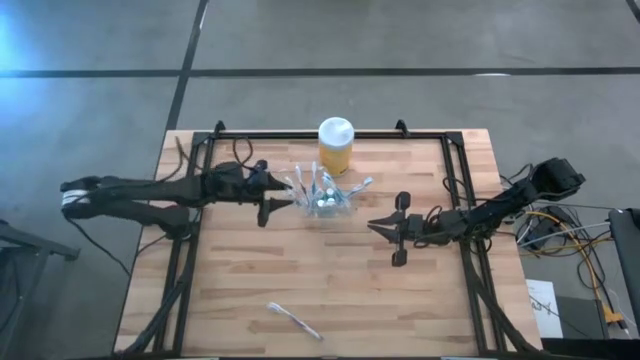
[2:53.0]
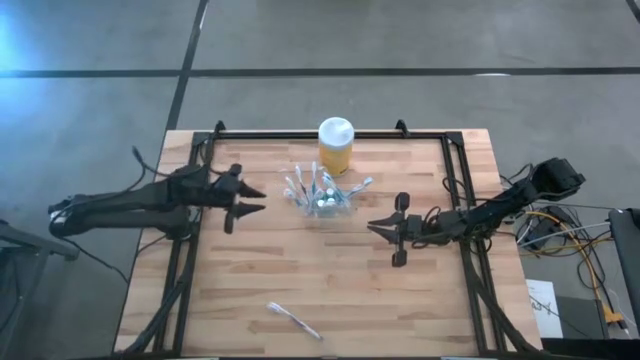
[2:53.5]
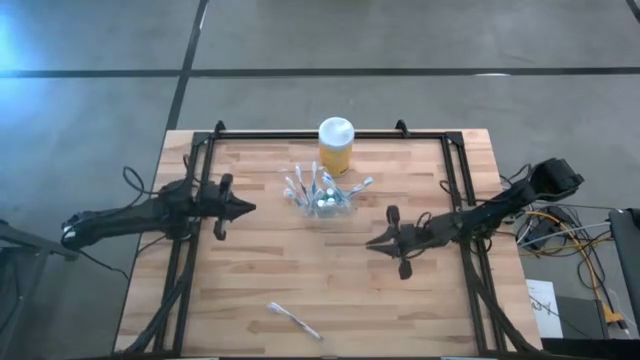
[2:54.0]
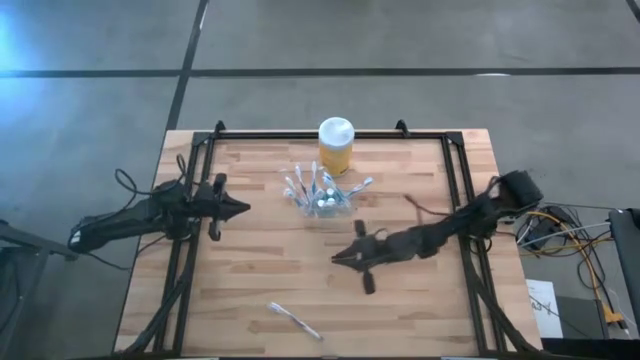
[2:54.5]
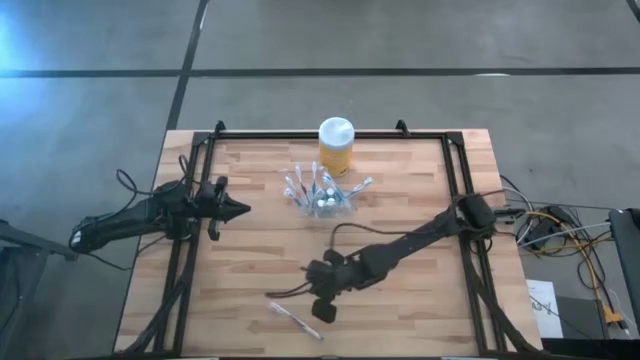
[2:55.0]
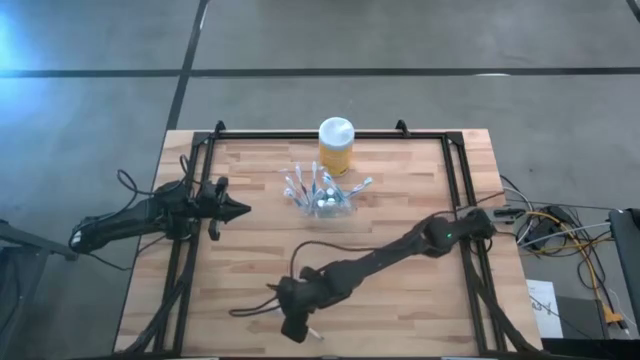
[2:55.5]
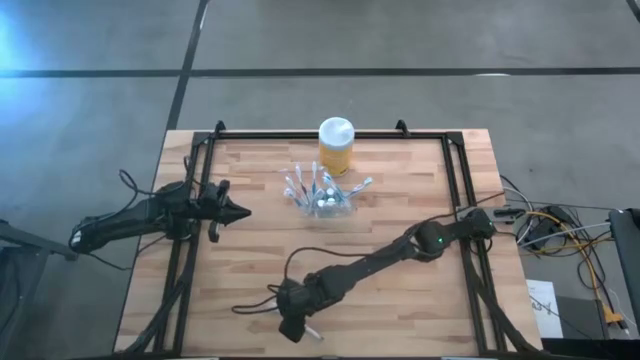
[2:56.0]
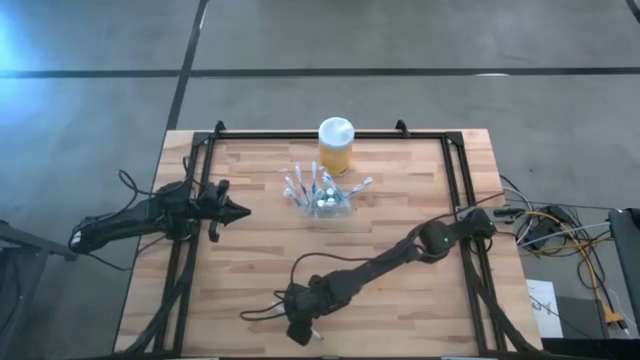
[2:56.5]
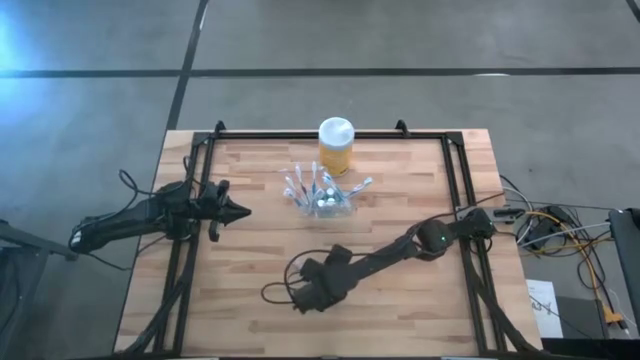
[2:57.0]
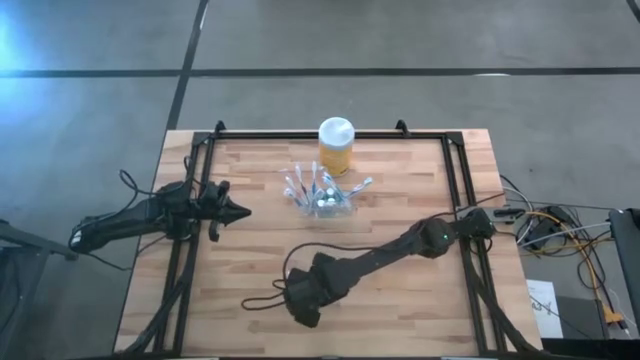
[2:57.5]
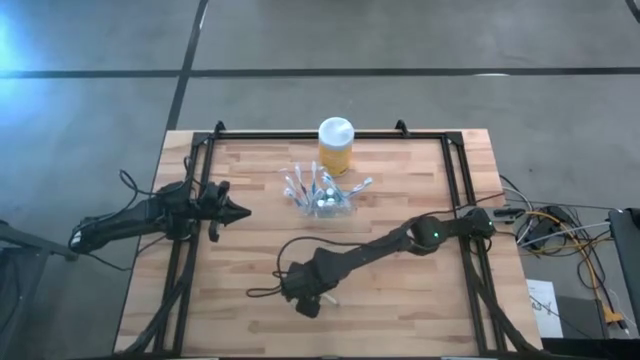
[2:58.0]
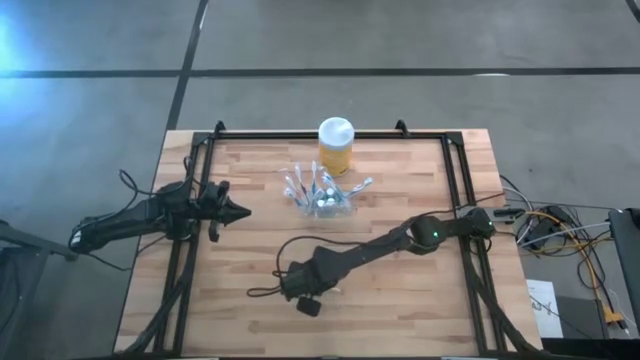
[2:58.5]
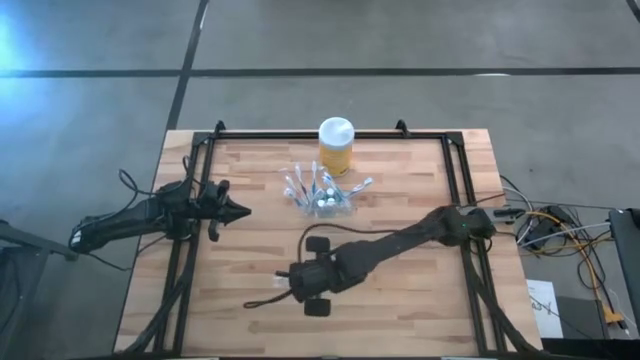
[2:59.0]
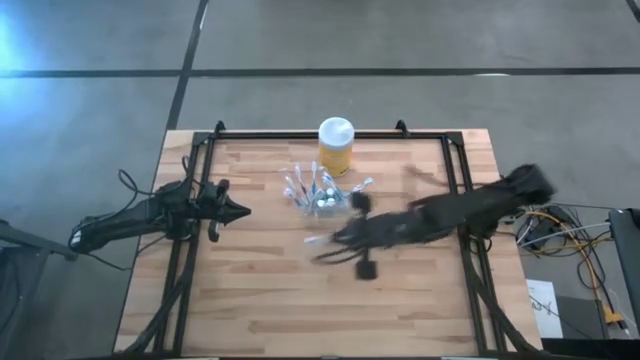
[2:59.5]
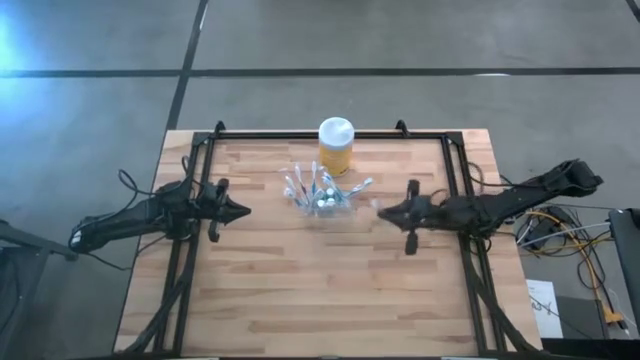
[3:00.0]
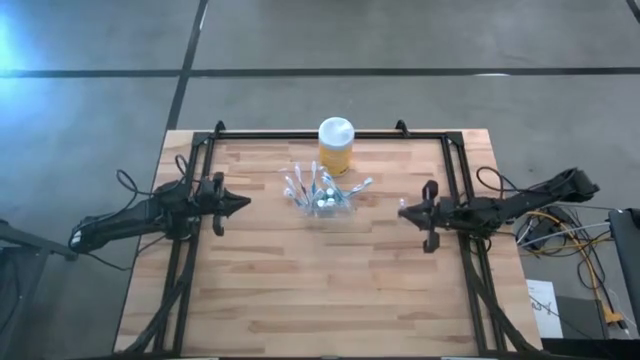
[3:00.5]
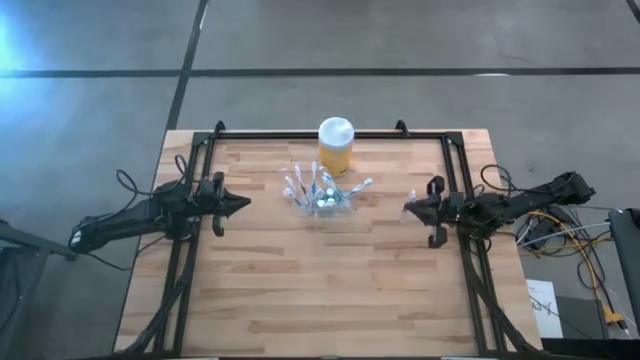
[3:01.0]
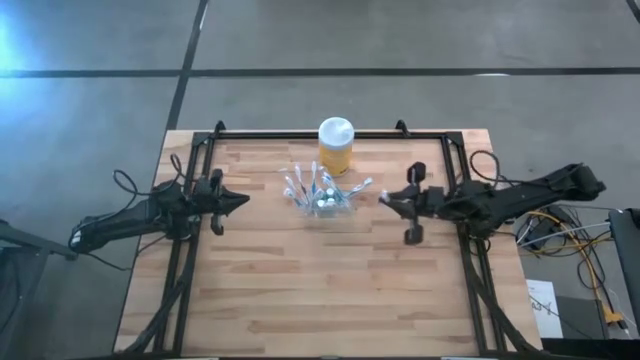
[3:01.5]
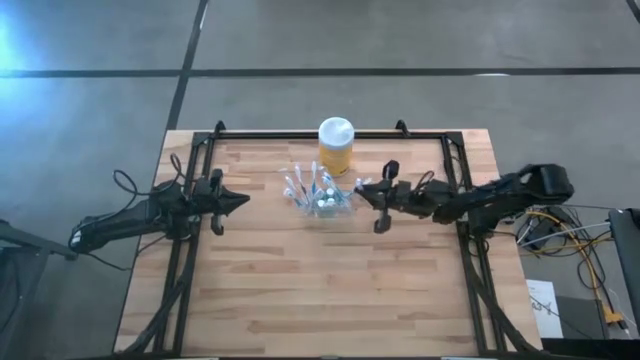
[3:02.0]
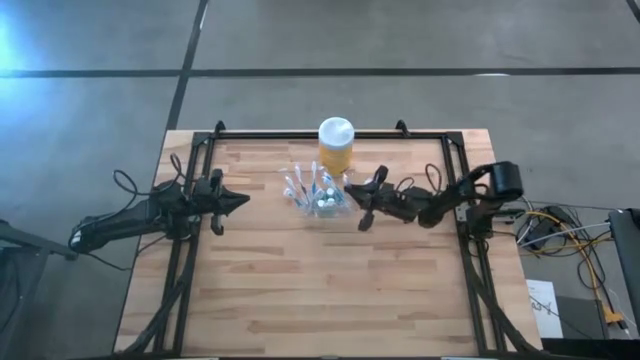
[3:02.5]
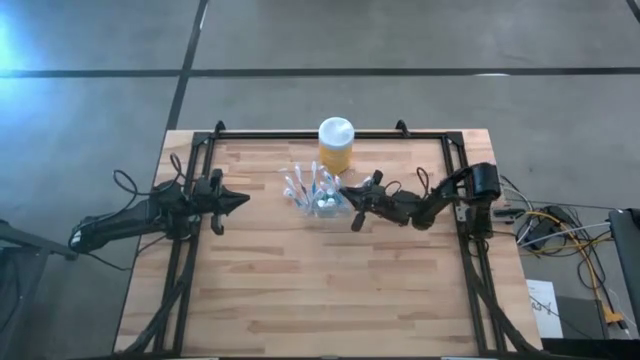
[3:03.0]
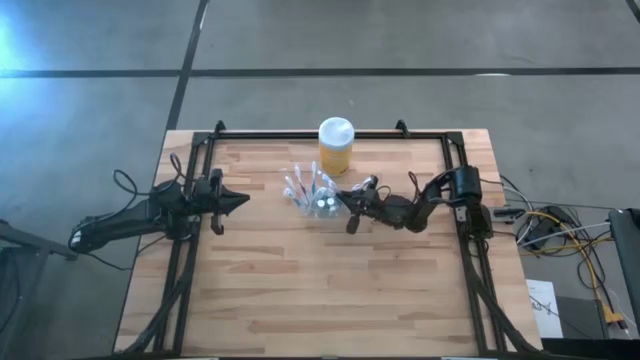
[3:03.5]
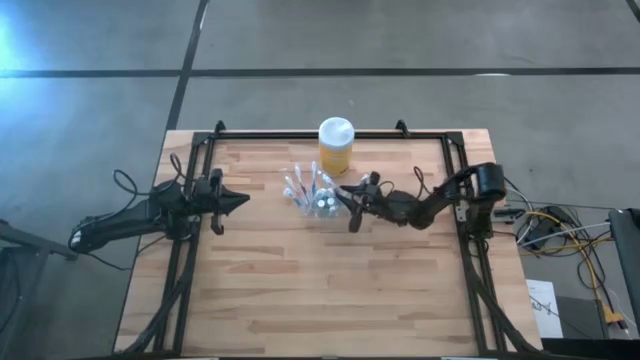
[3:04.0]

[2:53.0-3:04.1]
Task: Pick & Place toothbrushing station
Put the purple toothbrush into the transparent organizer

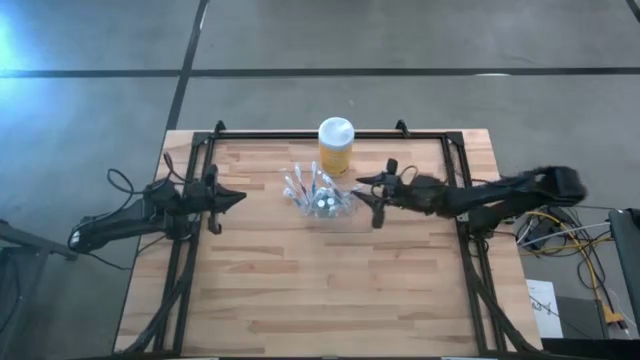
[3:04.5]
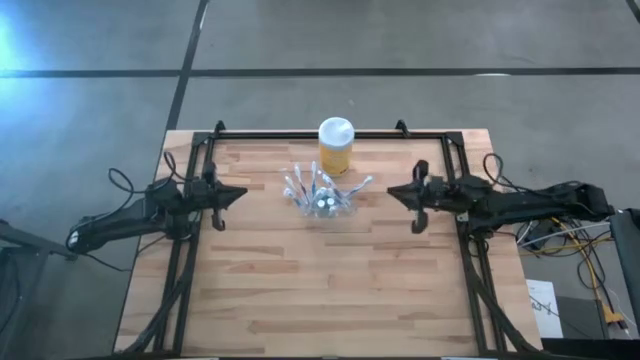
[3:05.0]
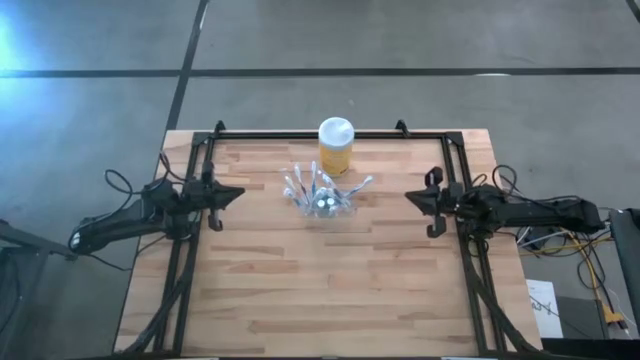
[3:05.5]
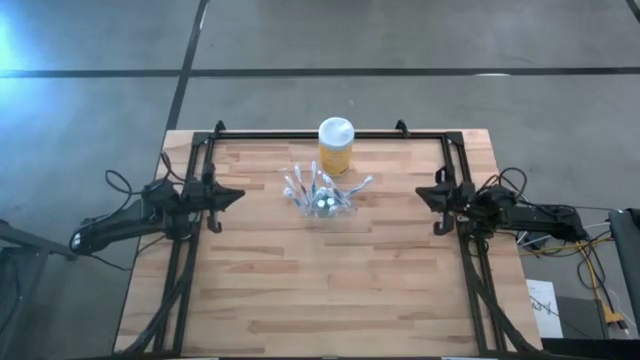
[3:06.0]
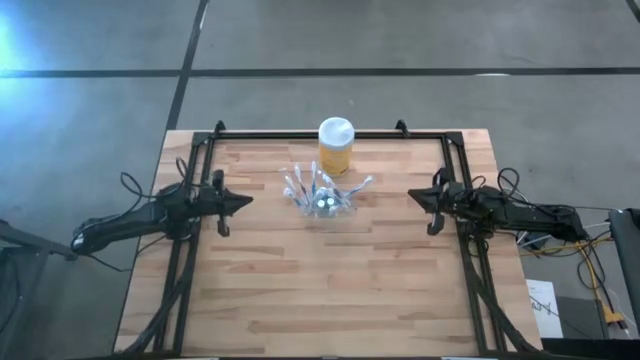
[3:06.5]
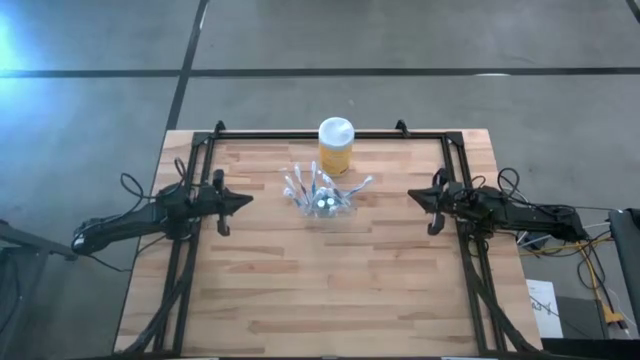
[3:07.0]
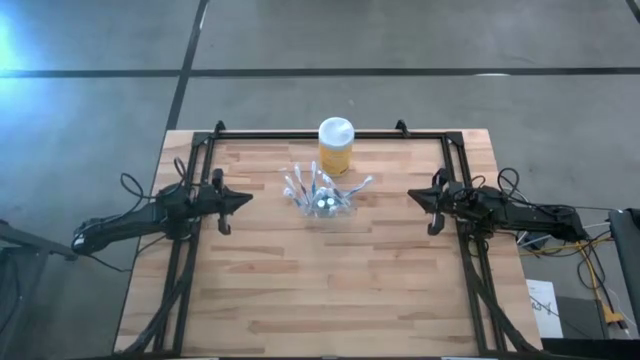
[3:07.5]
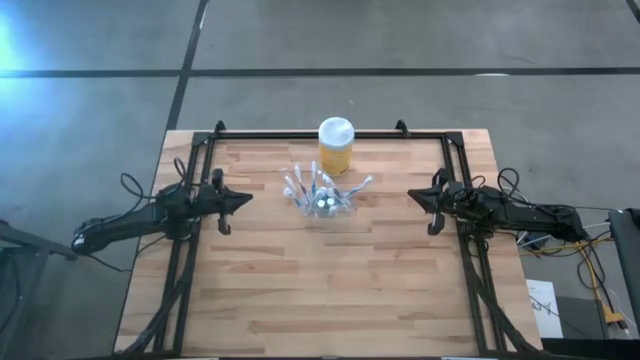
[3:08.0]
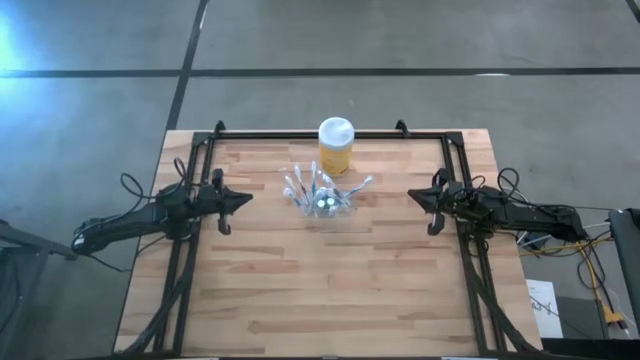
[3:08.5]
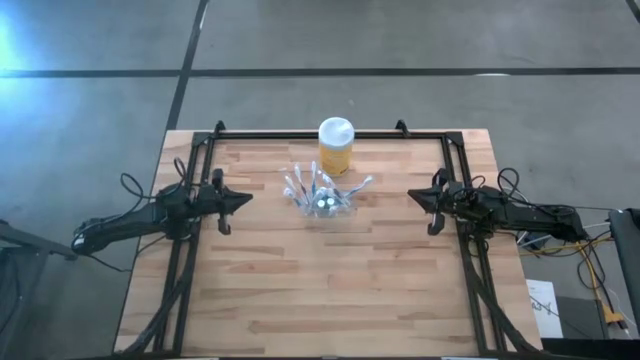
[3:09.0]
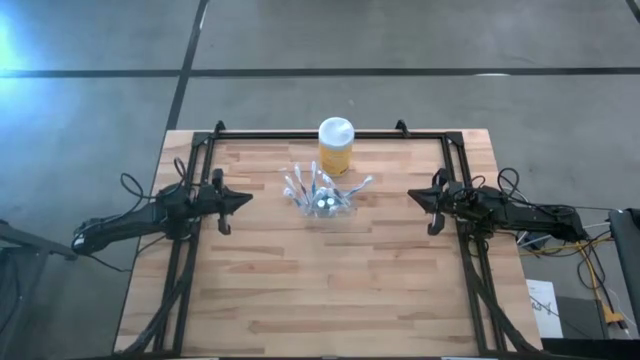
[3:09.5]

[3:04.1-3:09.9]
Return to Home Position

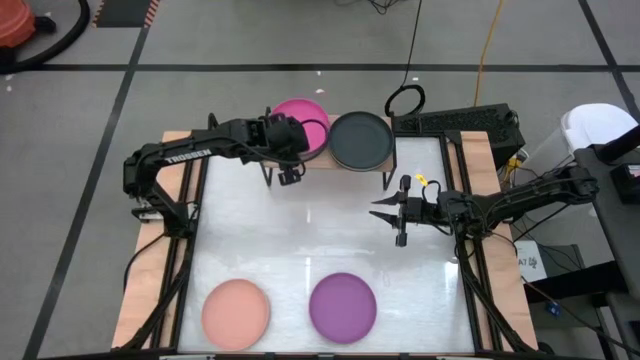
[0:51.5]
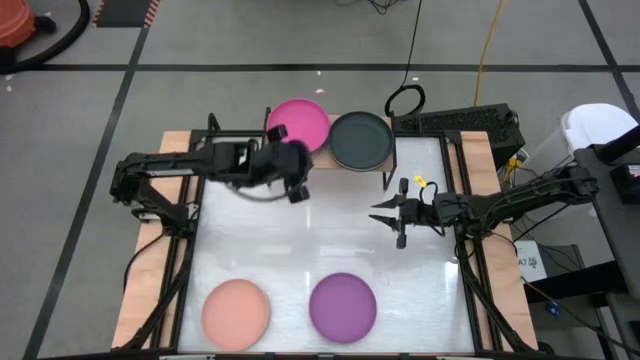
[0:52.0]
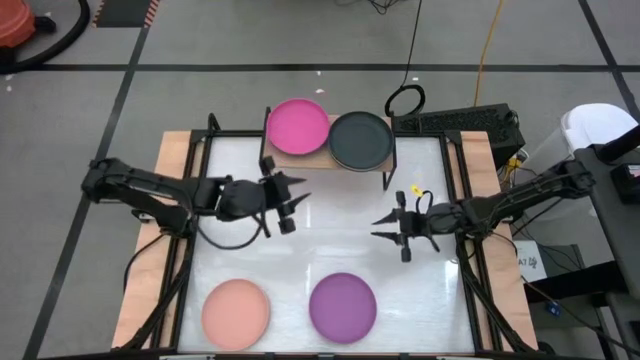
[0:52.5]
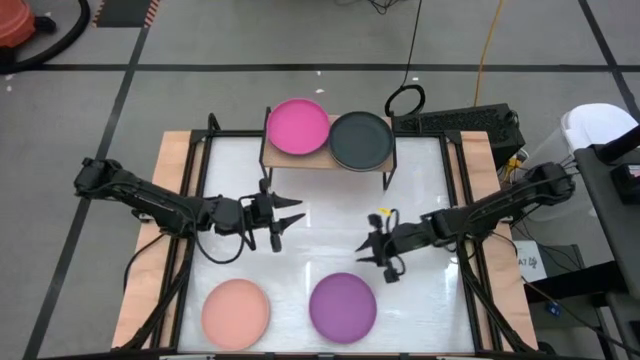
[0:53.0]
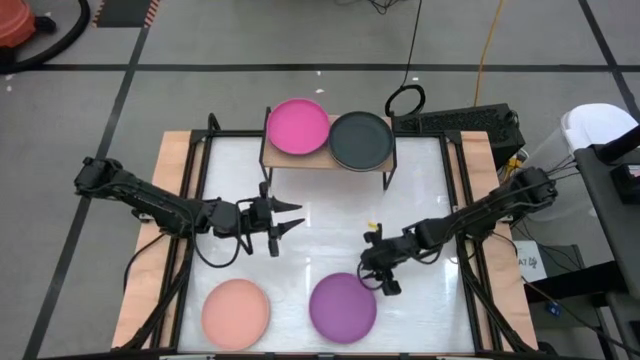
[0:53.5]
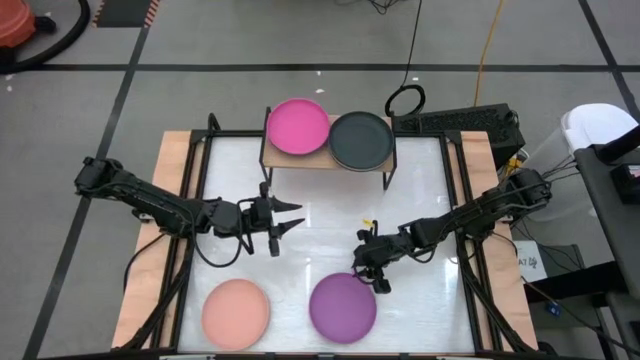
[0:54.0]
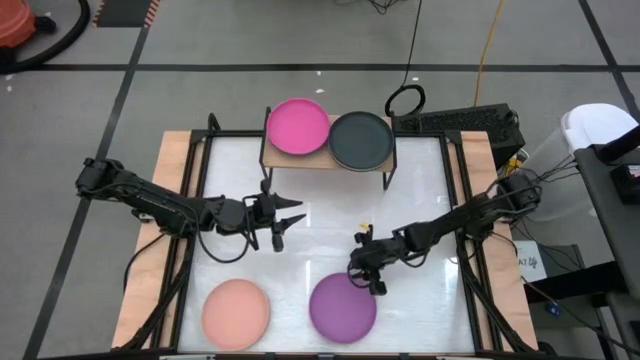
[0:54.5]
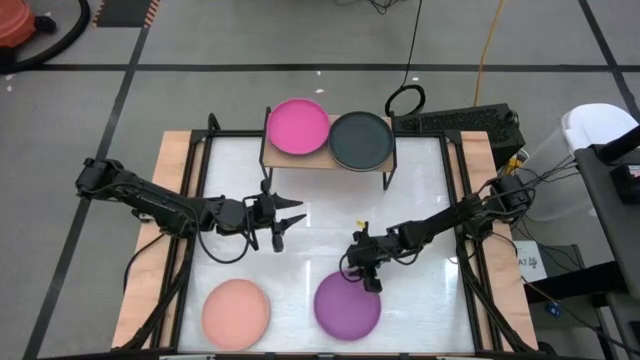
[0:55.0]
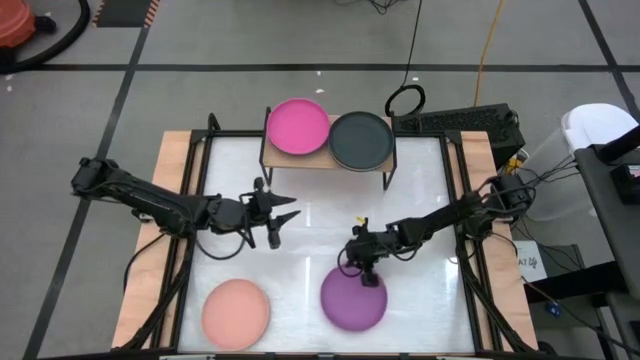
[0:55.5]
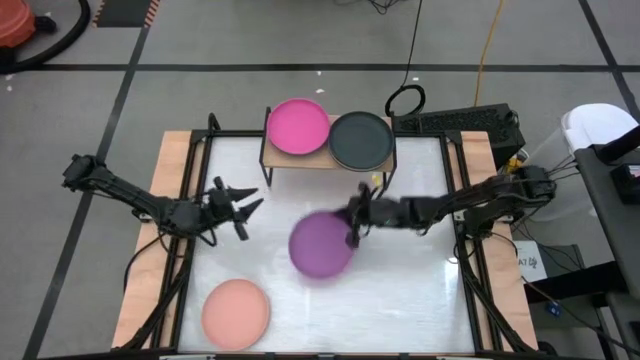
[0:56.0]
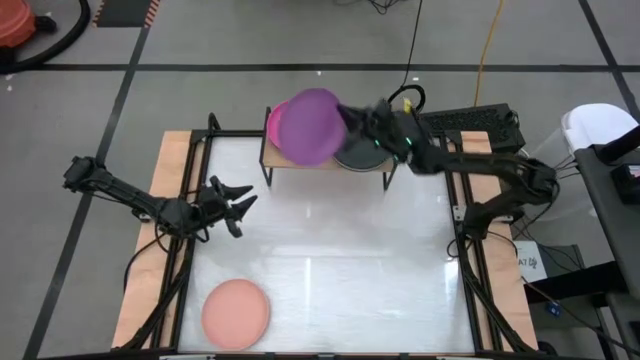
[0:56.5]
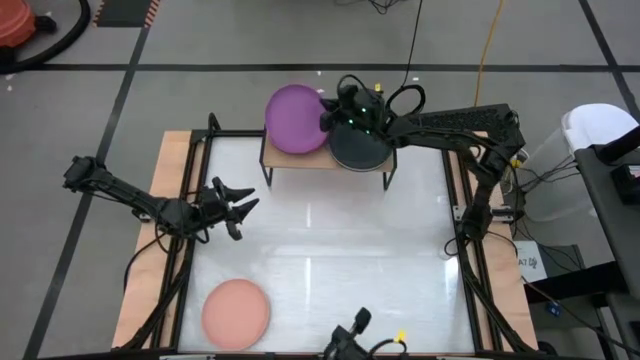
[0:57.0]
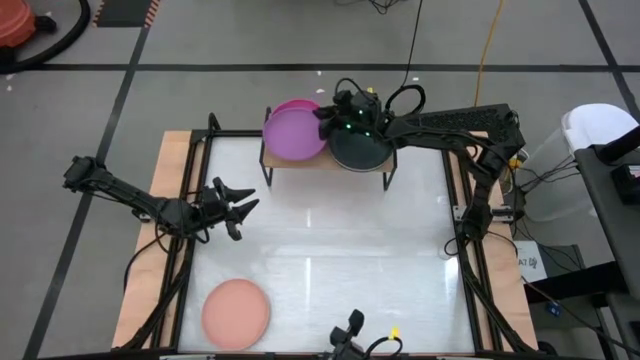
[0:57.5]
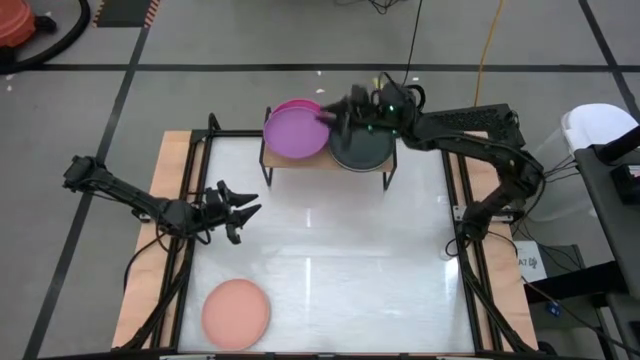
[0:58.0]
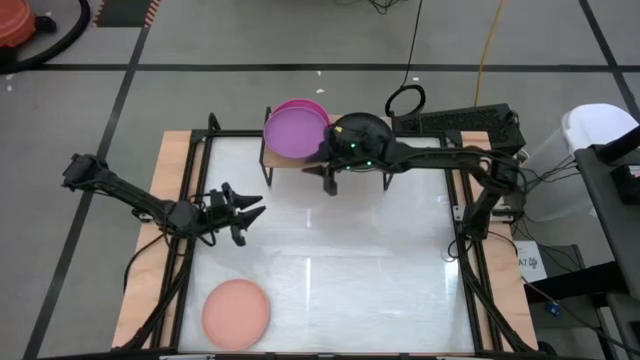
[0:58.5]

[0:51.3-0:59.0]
Task: Place and stack plates onto a shelf
Stack the purple plate on top of the pink plate on the shelf
